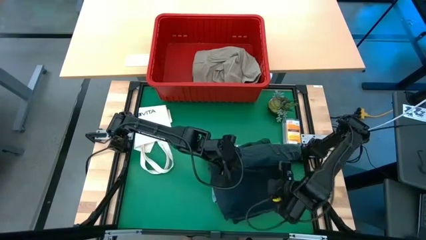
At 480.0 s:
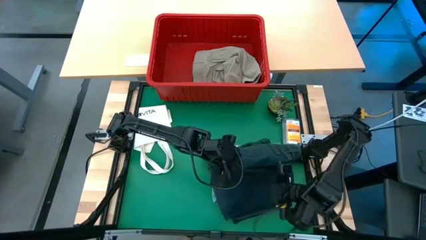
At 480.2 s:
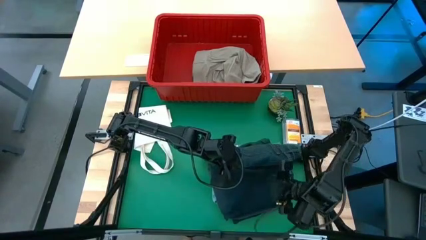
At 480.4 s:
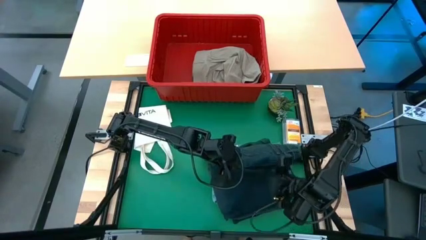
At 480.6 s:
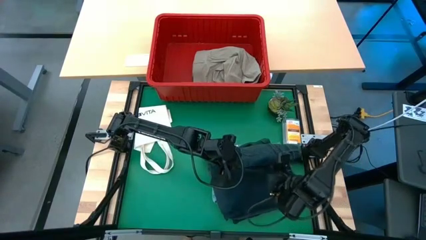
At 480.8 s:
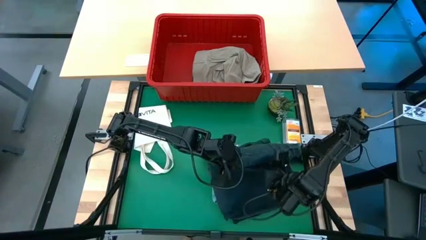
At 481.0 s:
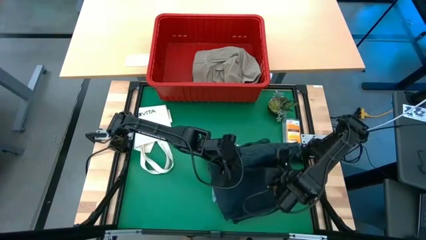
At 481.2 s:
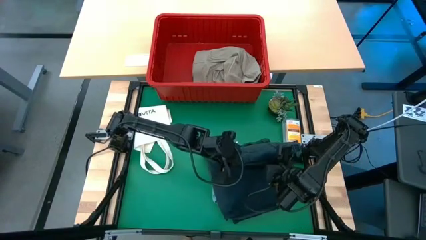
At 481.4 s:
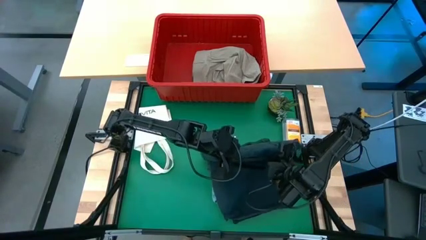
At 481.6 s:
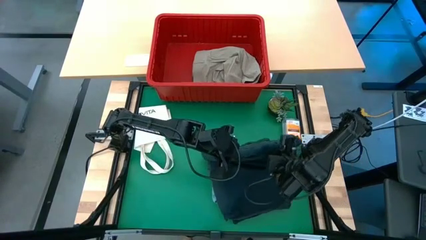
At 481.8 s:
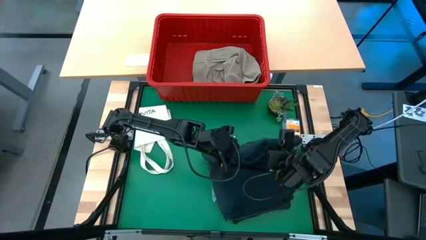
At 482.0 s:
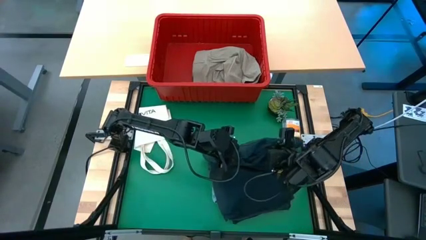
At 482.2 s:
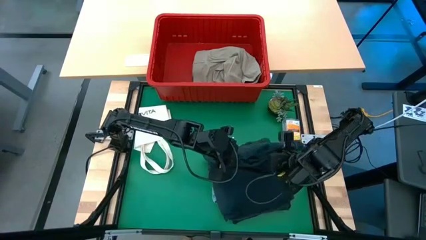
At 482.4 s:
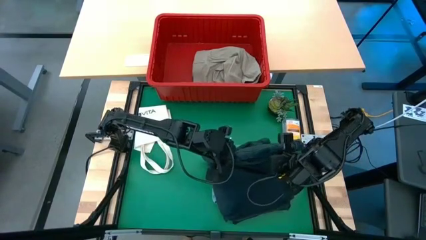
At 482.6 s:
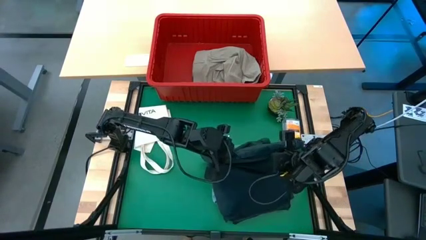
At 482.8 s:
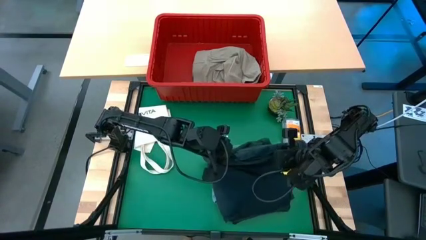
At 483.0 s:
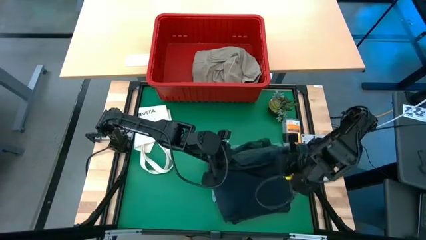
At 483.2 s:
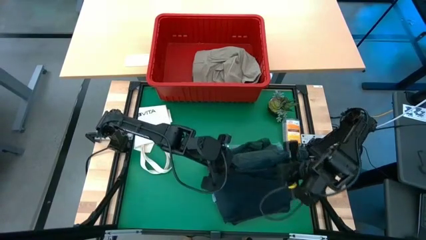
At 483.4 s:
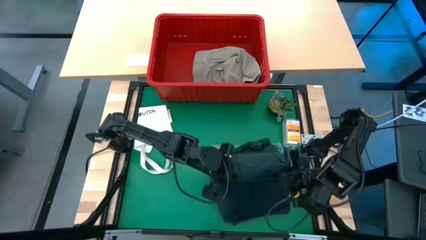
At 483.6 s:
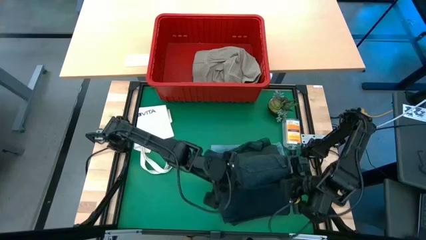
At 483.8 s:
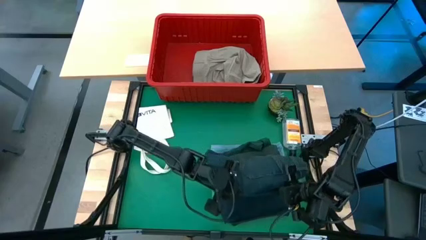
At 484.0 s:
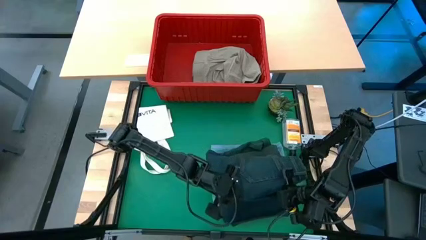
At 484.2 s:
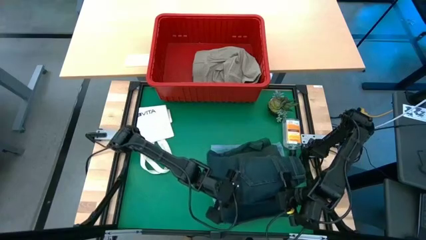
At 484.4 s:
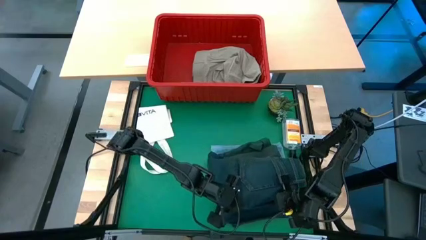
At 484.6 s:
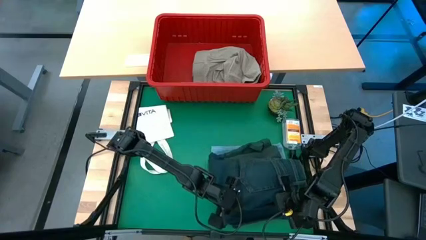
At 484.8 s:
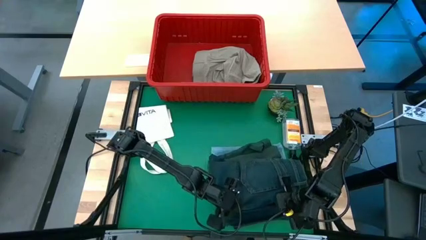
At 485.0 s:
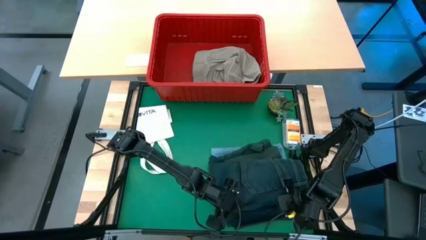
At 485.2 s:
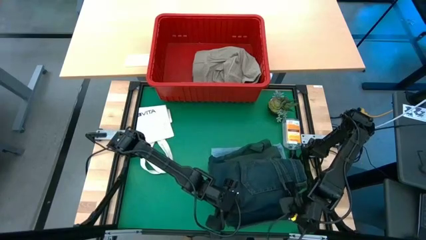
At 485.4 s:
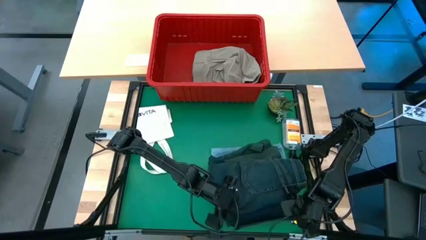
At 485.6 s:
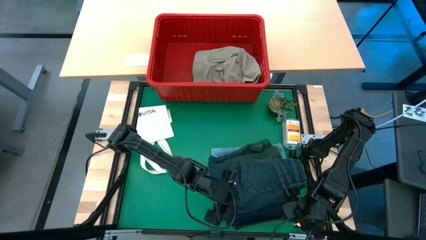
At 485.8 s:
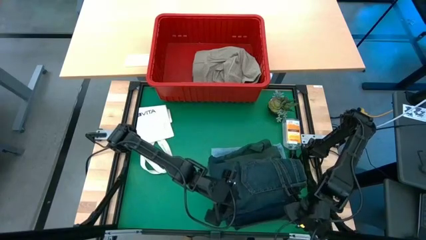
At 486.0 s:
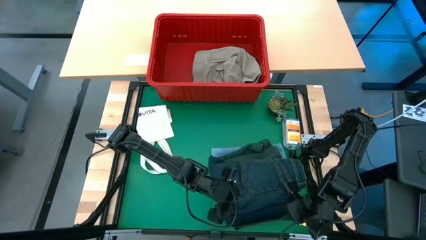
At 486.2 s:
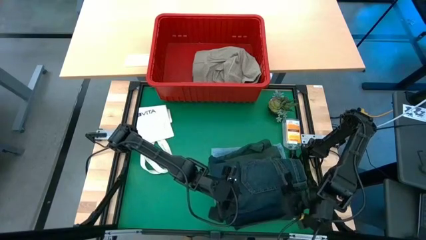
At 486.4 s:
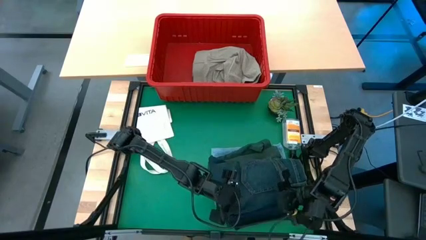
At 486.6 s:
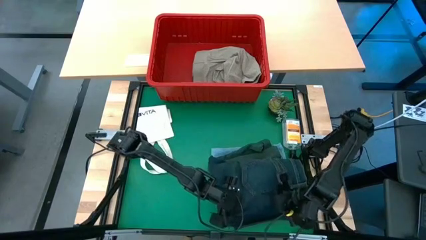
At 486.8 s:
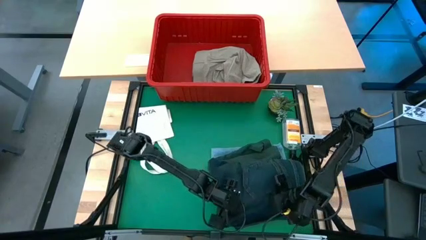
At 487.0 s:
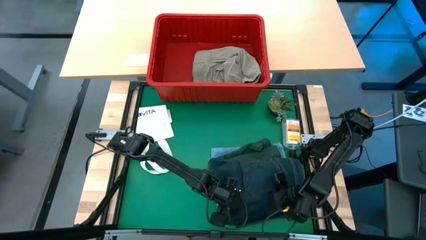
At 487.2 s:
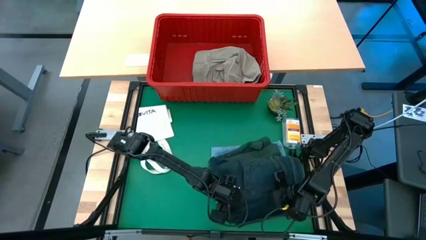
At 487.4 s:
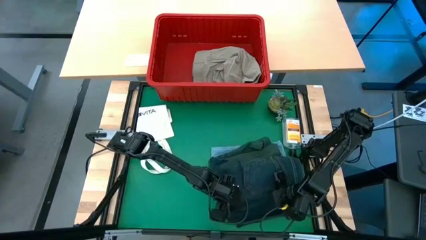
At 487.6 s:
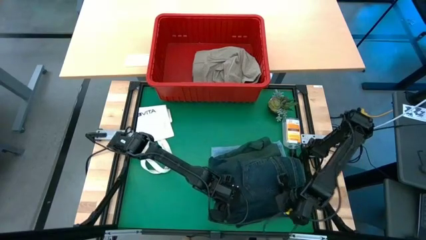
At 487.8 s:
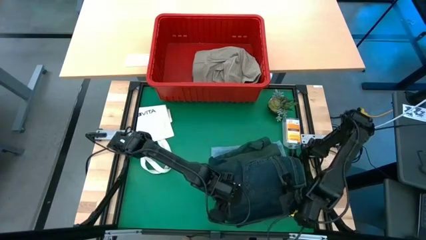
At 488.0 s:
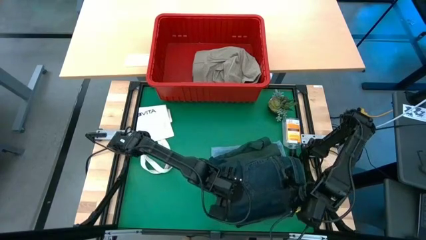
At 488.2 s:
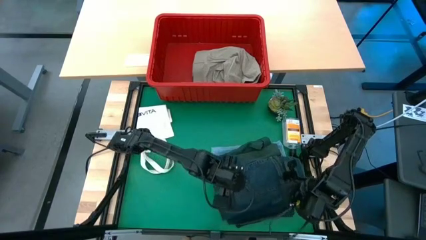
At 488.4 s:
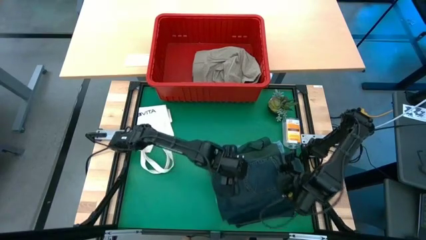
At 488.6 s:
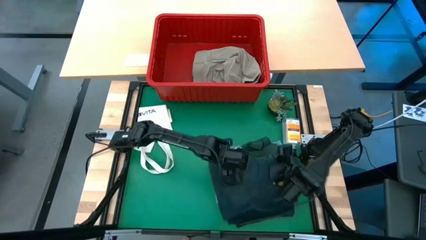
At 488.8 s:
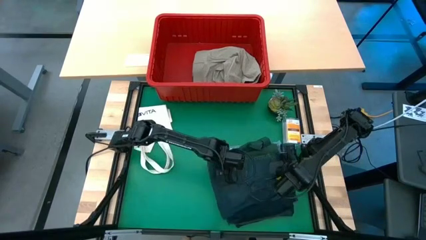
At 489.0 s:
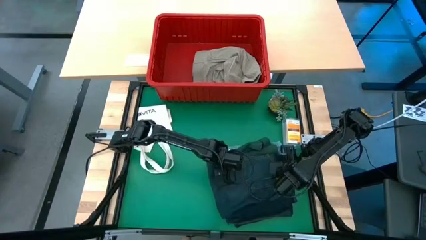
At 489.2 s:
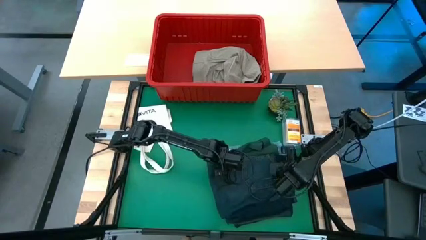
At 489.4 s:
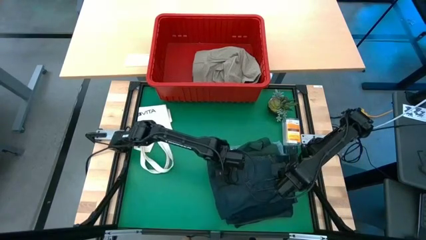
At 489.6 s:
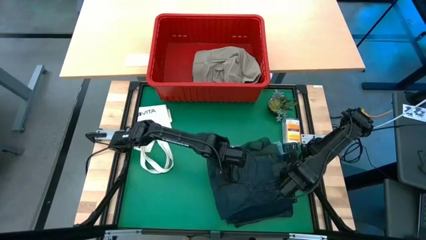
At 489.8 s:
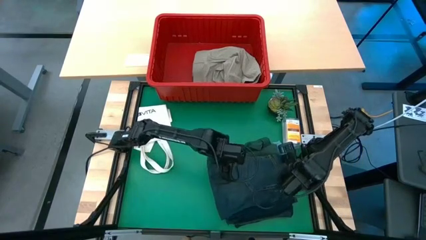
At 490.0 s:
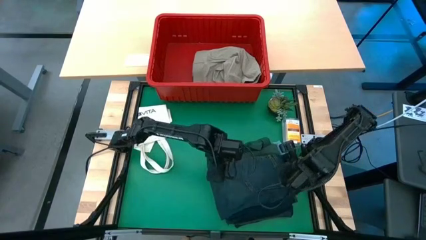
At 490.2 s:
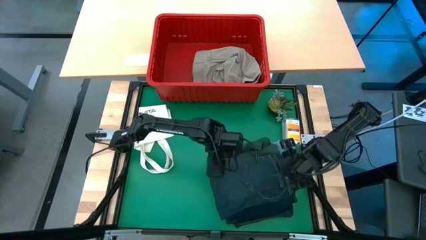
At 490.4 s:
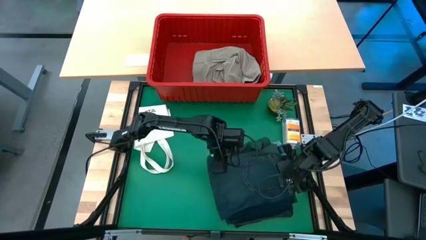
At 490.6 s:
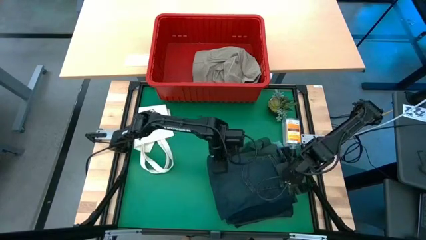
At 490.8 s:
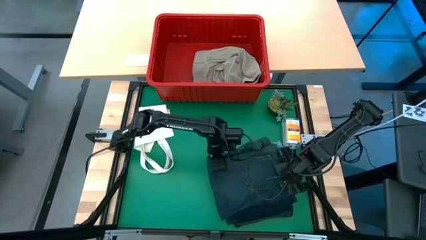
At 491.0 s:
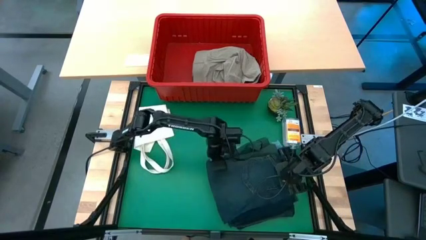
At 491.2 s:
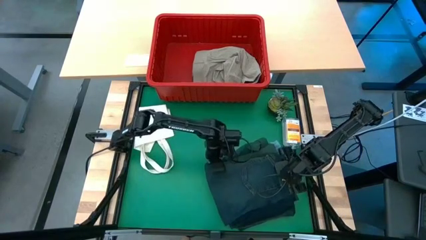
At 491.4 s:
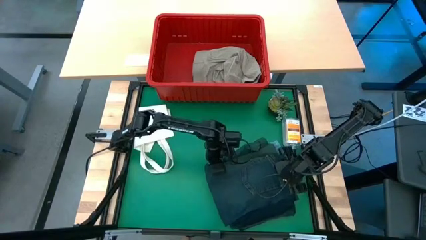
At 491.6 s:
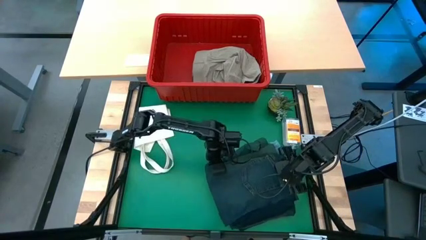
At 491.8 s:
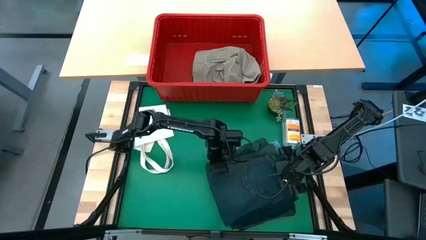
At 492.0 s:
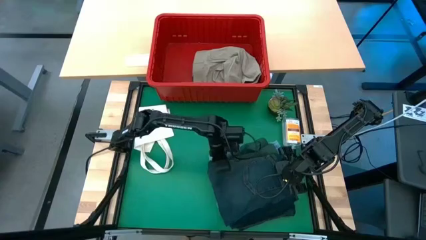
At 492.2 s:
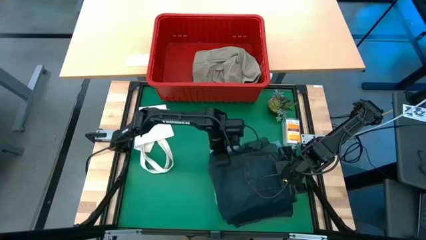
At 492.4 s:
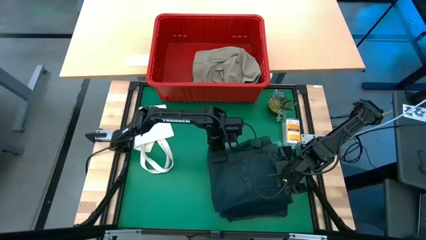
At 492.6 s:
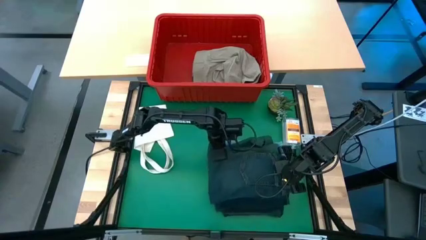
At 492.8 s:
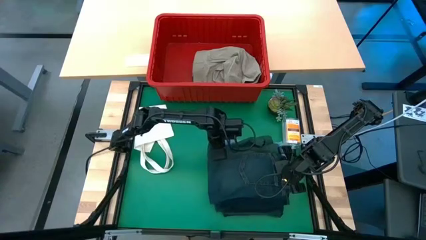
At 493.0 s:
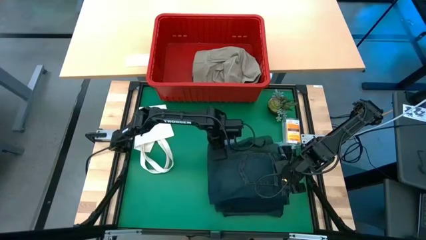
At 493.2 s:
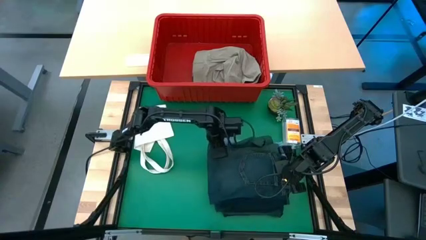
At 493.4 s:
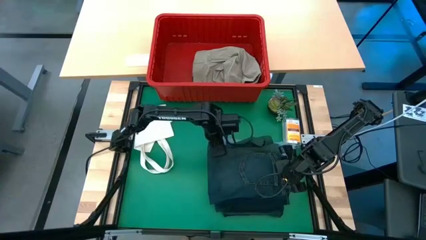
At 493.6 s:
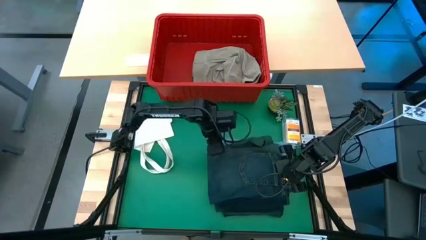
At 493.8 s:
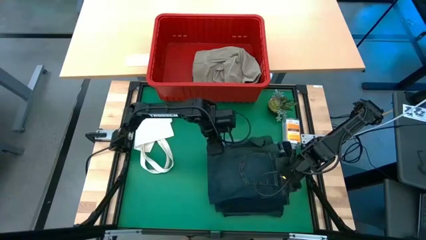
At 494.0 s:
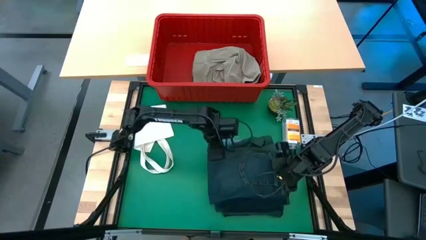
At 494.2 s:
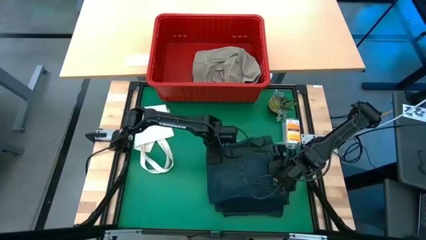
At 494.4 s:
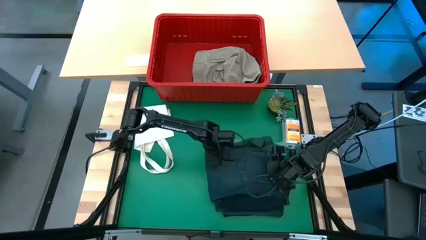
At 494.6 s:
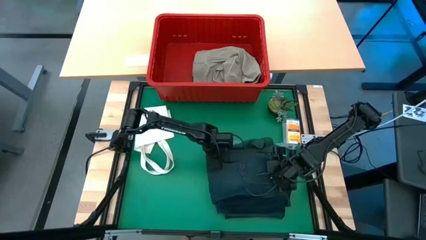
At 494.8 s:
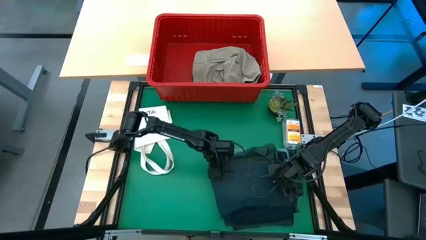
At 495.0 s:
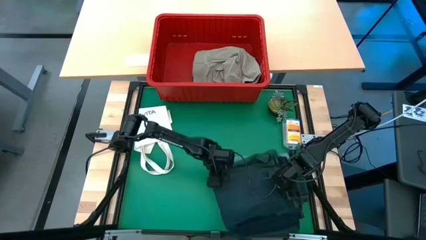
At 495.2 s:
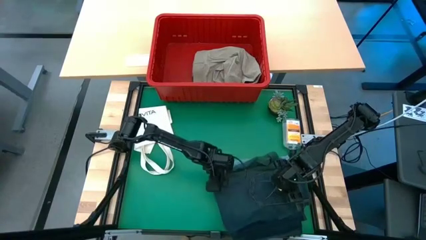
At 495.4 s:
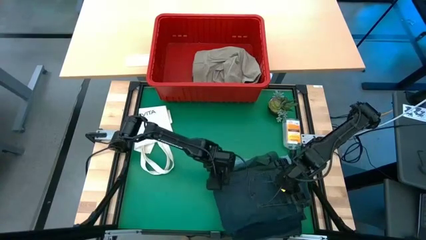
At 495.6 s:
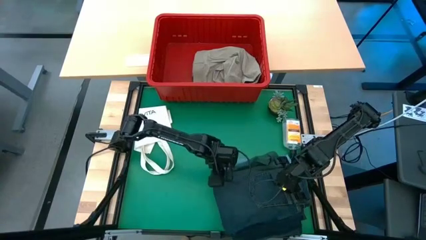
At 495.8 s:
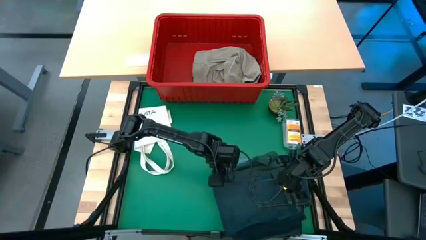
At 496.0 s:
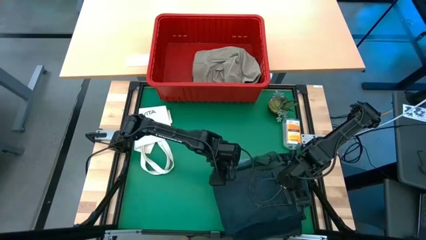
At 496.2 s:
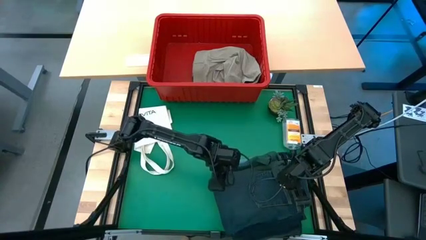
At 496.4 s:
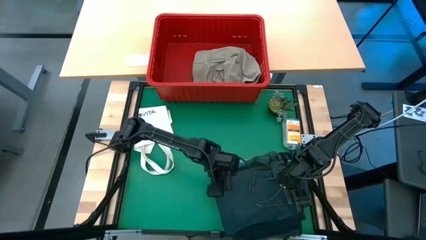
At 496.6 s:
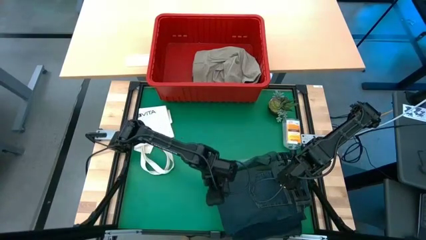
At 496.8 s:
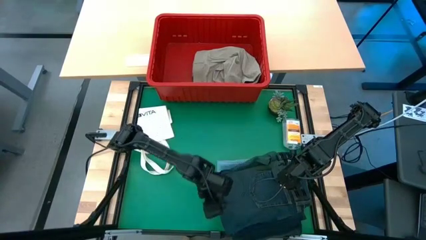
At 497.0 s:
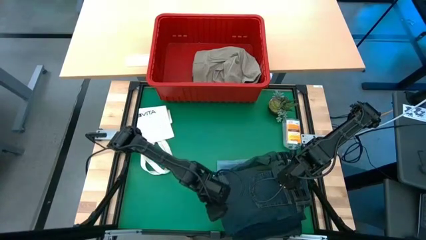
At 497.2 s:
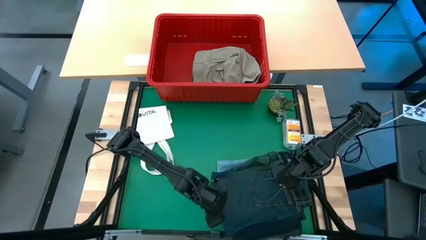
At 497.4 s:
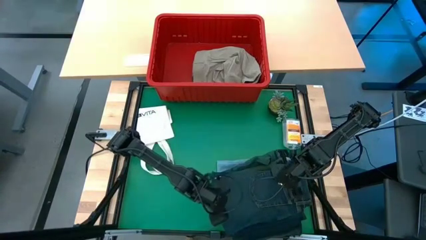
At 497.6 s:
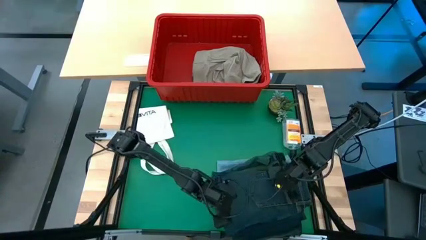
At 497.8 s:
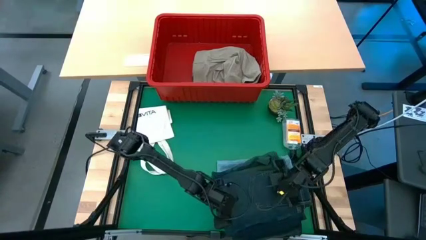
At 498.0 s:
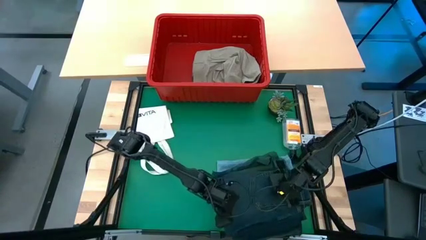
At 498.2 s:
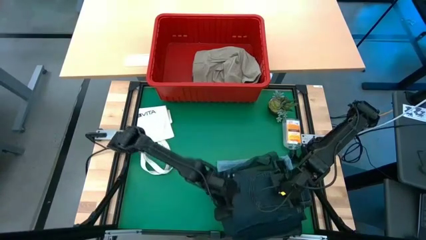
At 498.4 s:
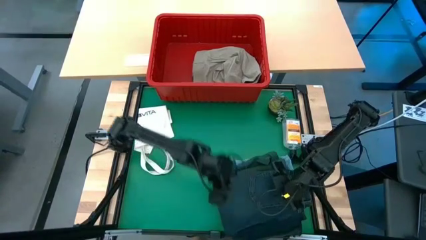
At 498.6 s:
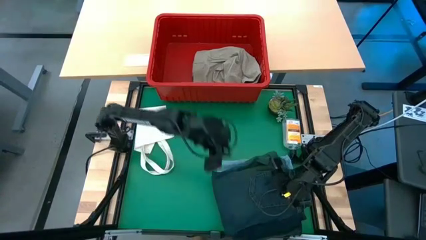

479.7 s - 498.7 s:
Task: Fold Laundry from Bin
Fold the dark blue jeans
